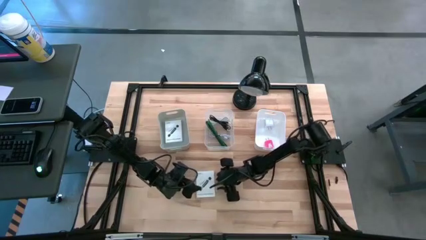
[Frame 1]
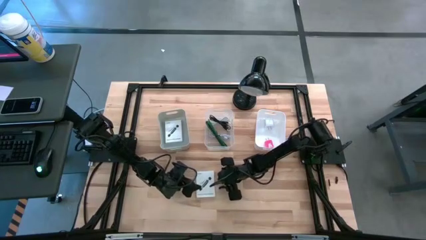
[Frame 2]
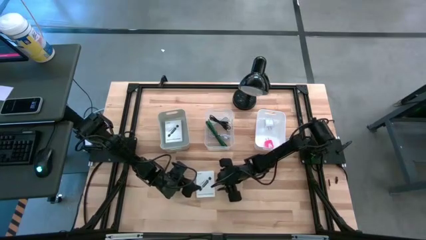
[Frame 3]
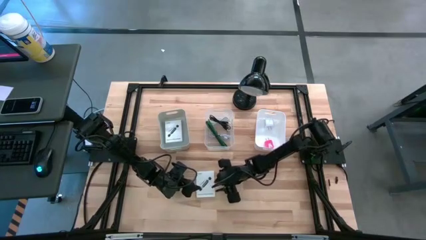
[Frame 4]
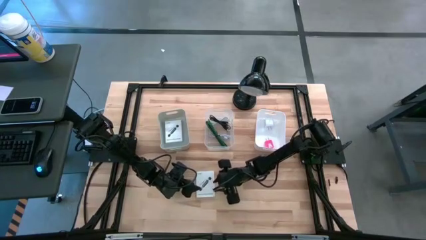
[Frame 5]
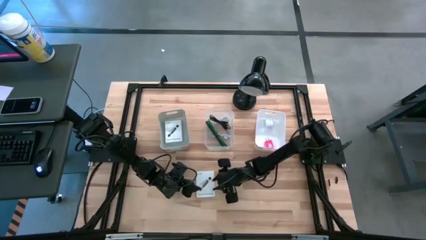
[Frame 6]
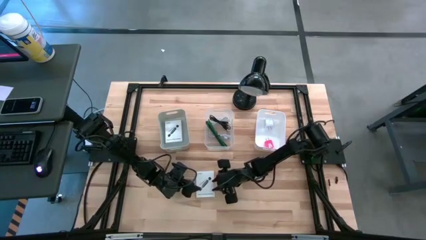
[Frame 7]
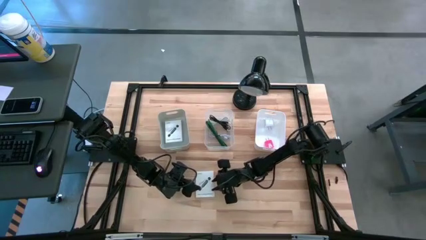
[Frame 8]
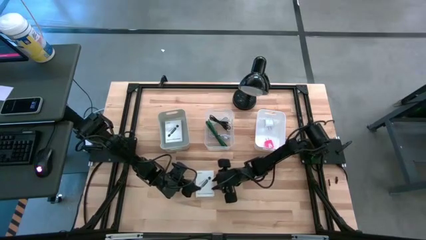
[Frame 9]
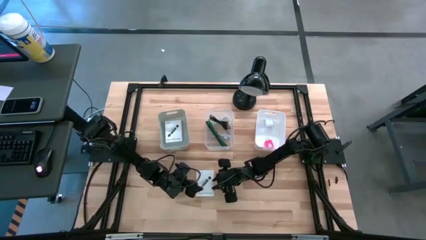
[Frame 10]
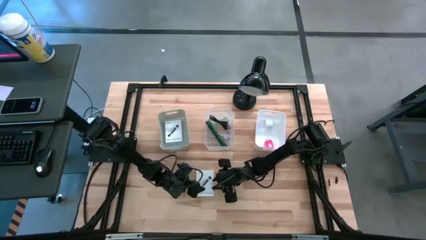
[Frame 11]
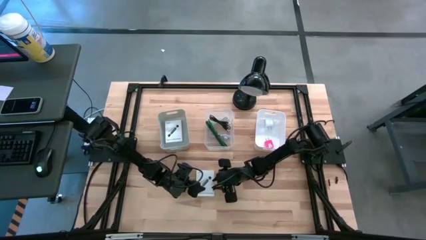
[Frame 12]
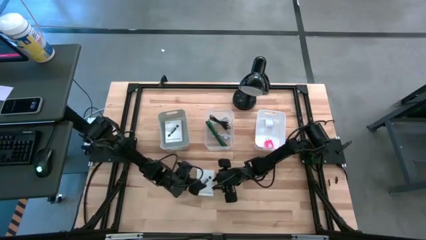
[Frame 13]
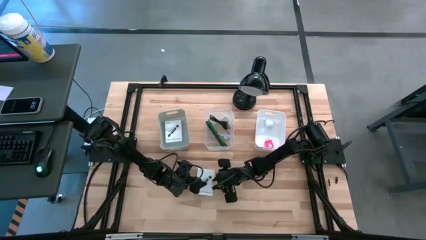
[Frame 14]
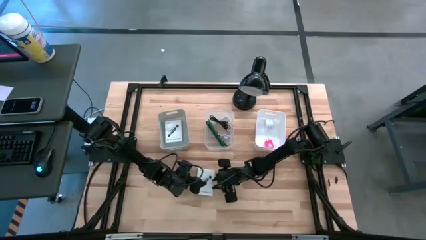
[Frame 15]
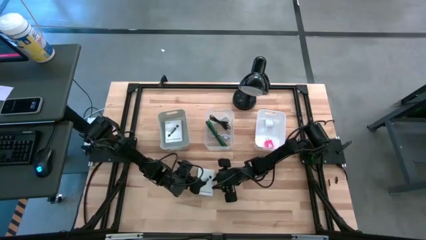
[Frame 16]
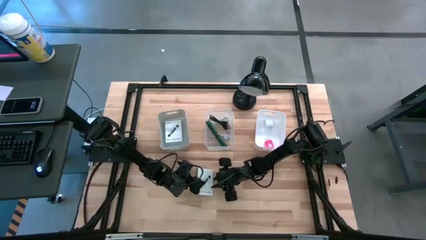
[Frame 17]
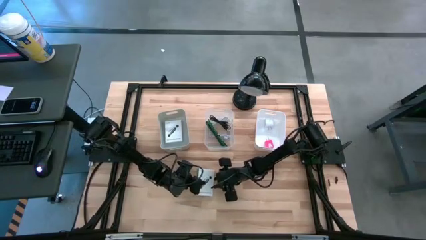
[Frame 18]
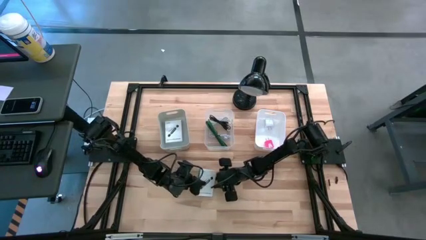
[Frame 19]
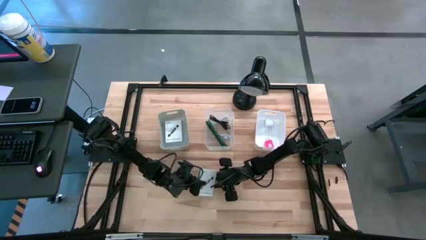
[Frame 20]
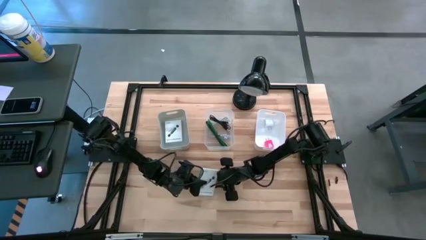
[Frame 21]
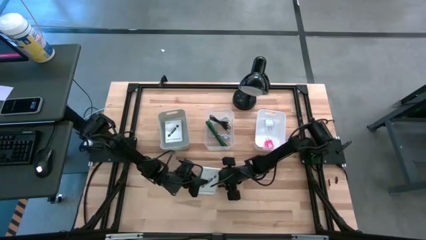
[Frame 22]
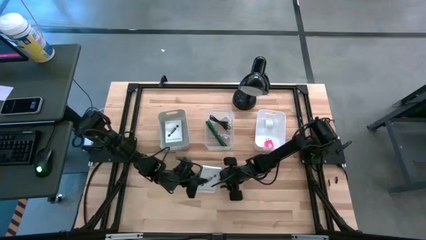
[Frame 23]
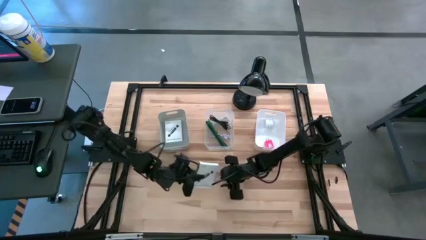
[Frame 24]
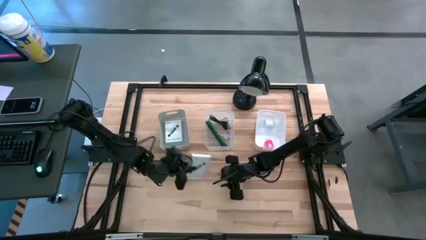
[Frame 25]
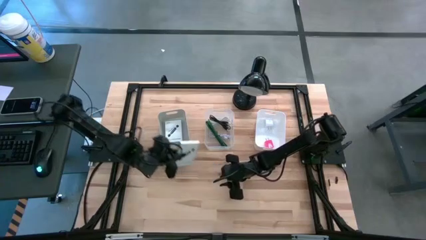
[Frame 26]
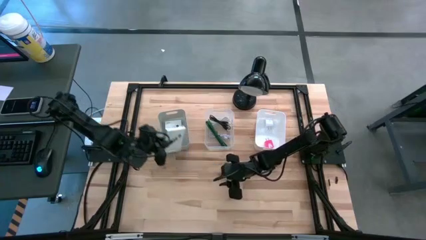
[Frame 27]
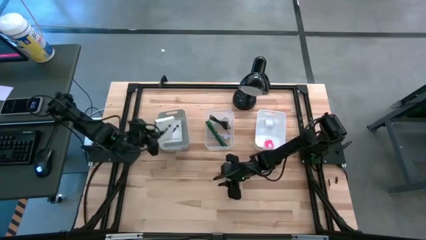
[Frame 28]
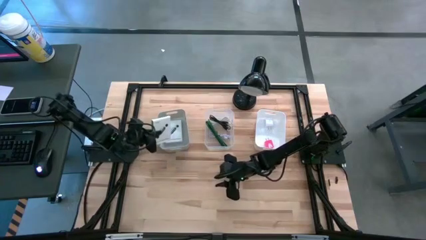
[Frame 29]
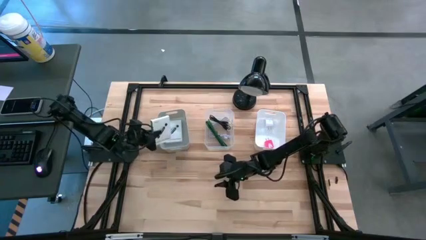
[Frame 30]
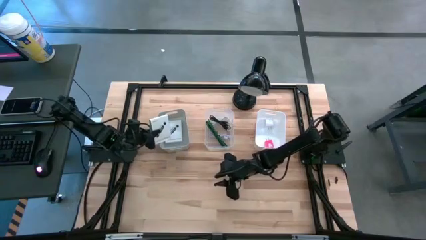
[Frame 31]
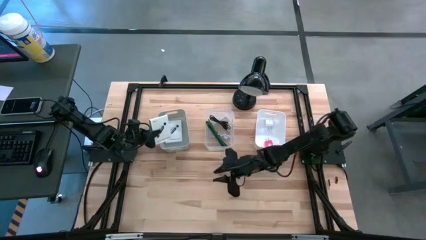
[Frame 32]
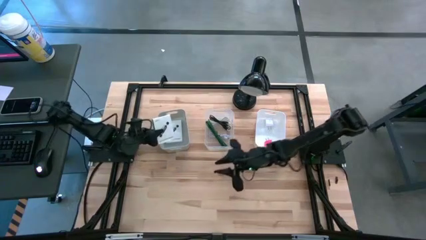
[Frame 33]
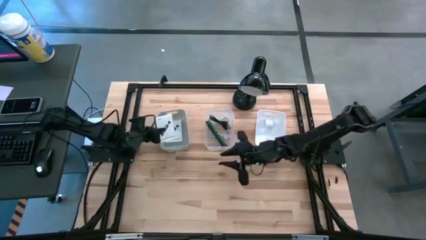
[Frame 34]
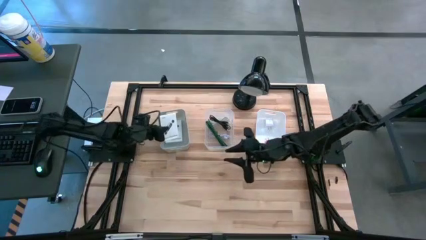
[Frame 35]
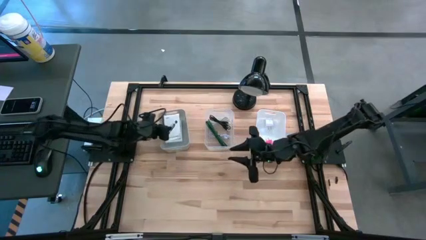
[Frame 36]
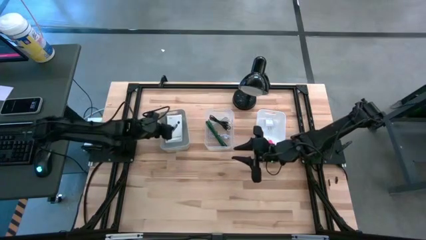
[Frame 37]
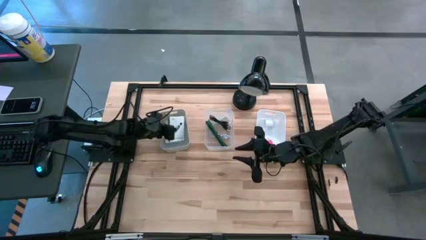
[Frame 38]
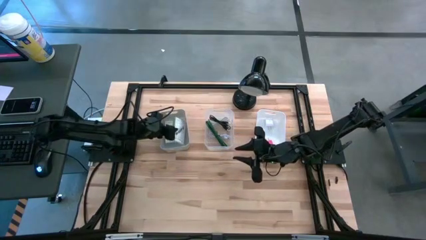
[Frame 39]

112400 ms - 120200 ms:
Task: Pick and place items into bin
Put the white card reader box into the gray bin

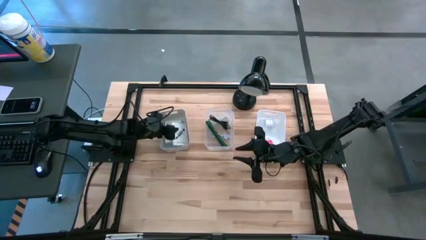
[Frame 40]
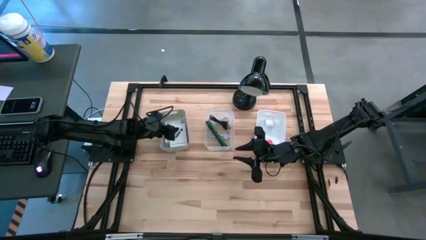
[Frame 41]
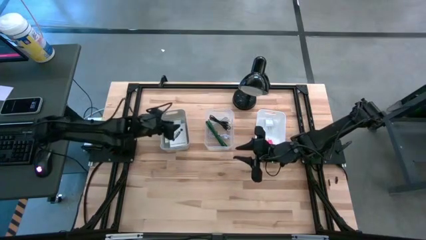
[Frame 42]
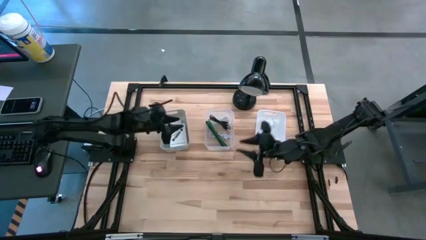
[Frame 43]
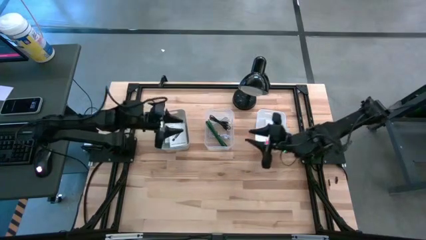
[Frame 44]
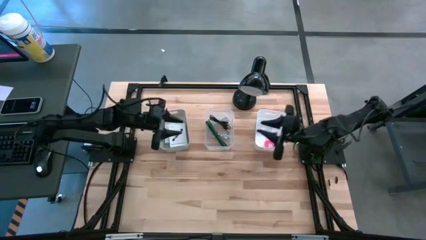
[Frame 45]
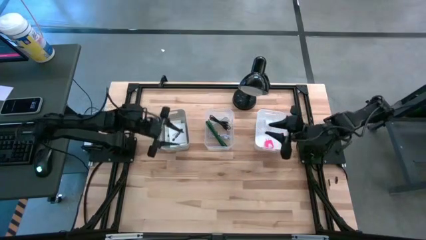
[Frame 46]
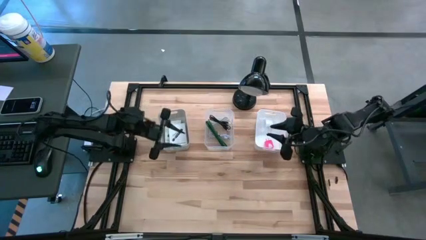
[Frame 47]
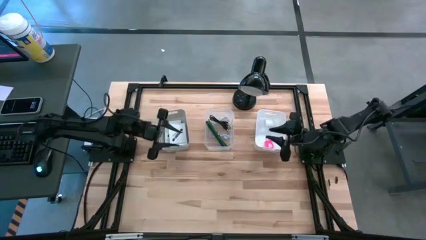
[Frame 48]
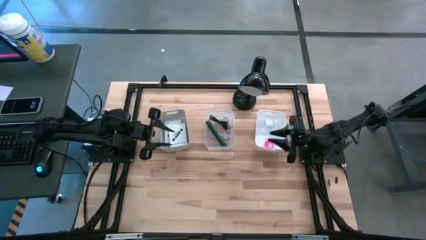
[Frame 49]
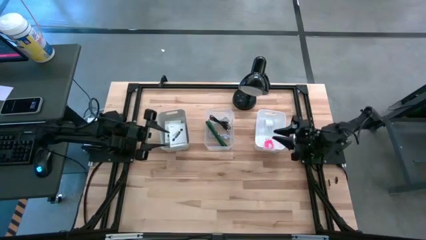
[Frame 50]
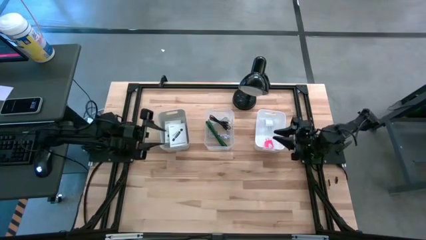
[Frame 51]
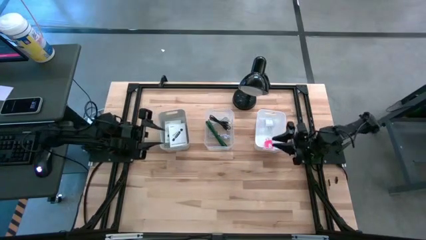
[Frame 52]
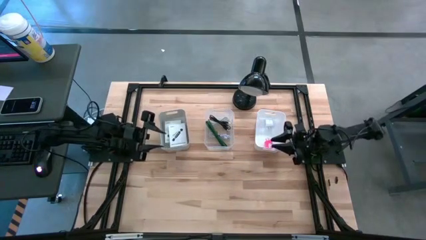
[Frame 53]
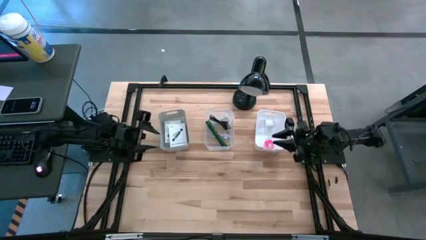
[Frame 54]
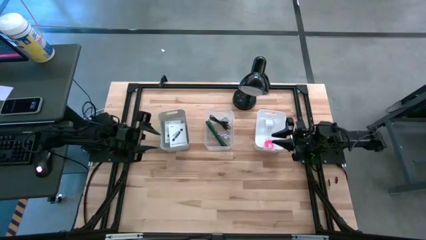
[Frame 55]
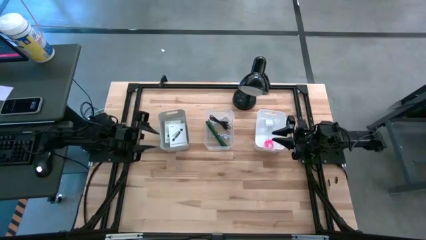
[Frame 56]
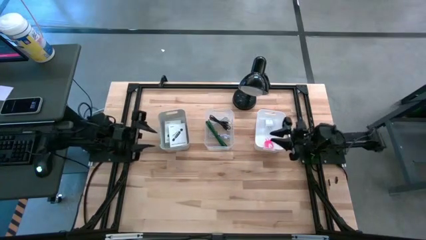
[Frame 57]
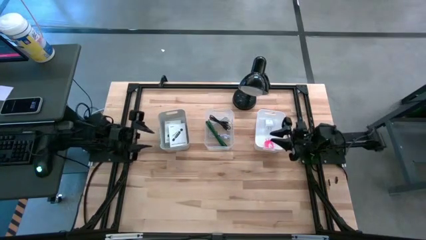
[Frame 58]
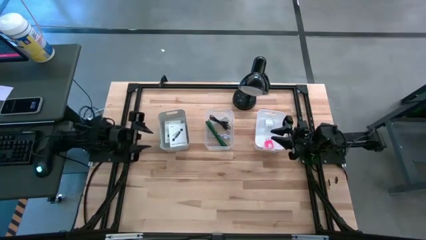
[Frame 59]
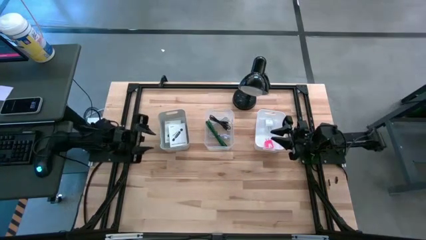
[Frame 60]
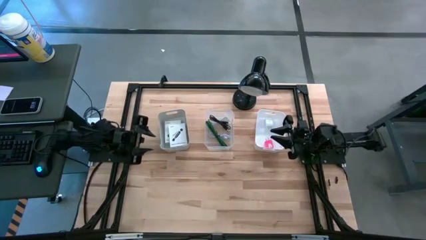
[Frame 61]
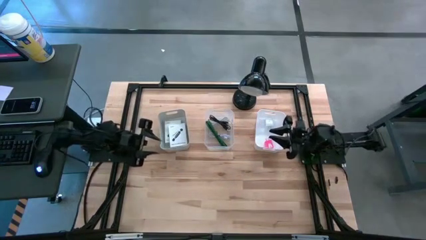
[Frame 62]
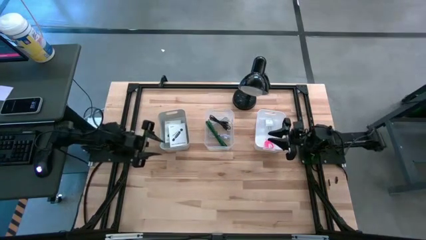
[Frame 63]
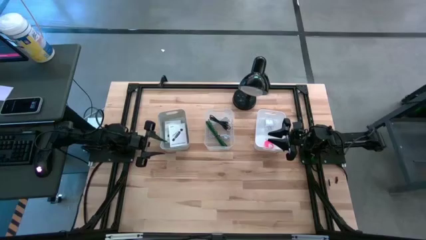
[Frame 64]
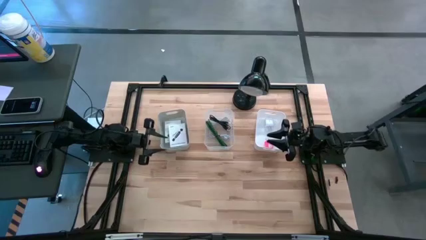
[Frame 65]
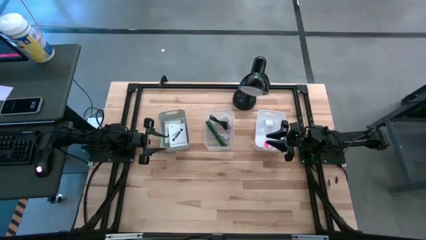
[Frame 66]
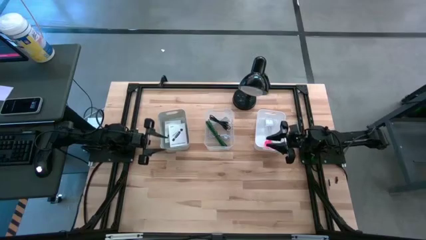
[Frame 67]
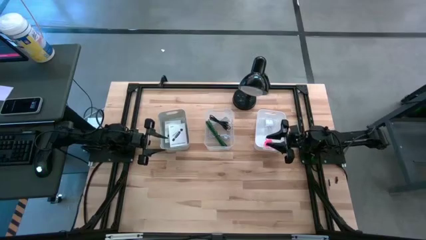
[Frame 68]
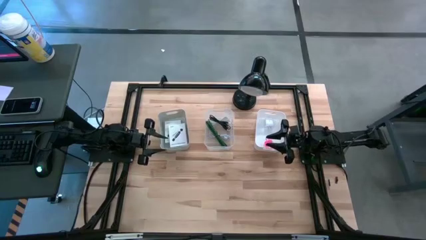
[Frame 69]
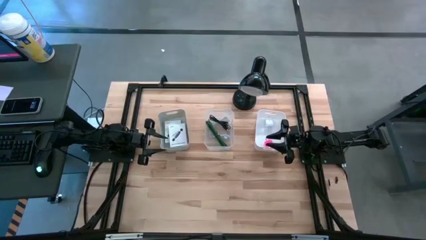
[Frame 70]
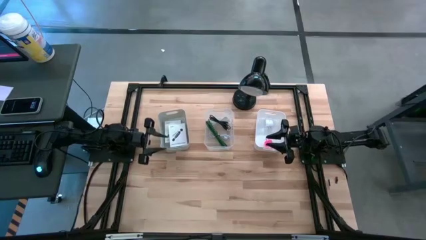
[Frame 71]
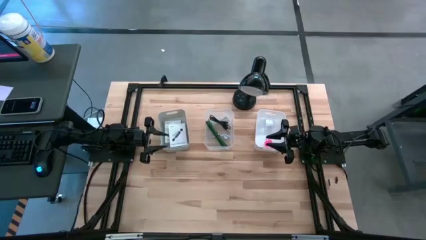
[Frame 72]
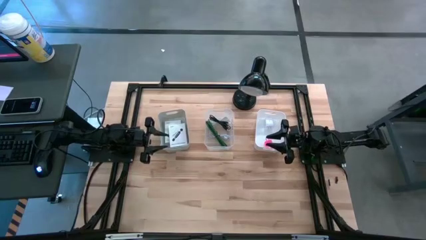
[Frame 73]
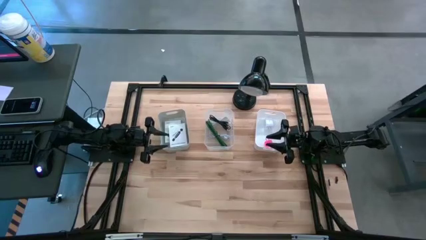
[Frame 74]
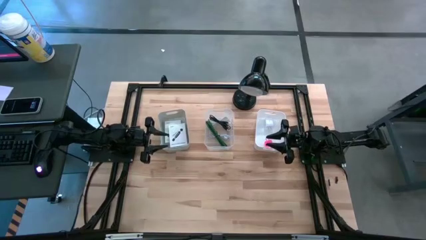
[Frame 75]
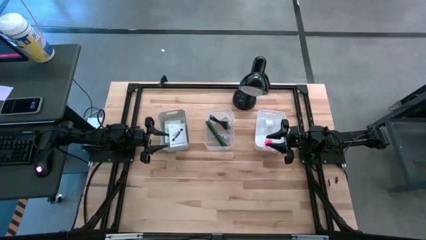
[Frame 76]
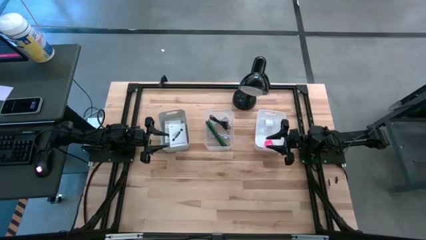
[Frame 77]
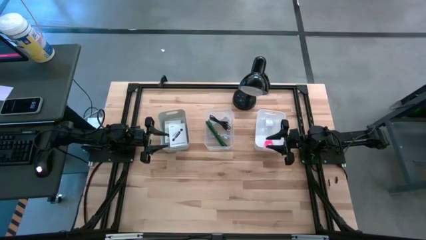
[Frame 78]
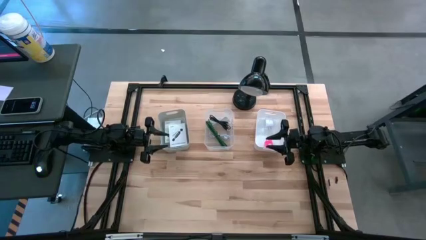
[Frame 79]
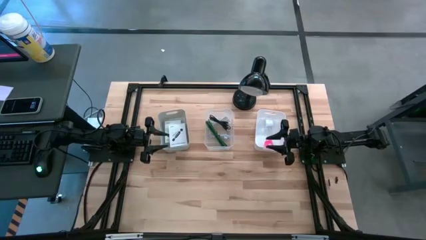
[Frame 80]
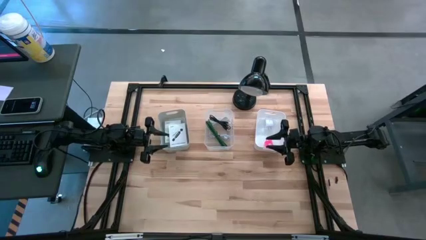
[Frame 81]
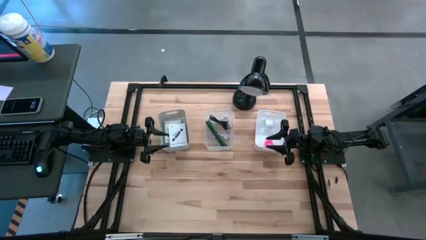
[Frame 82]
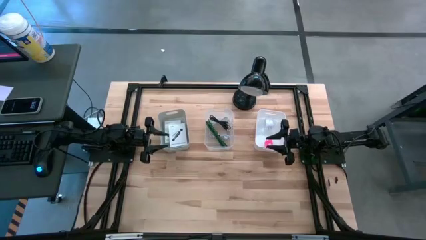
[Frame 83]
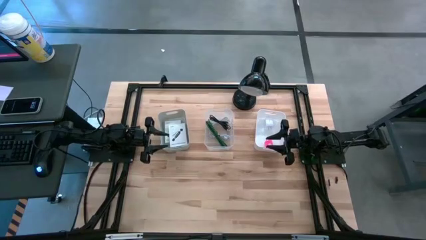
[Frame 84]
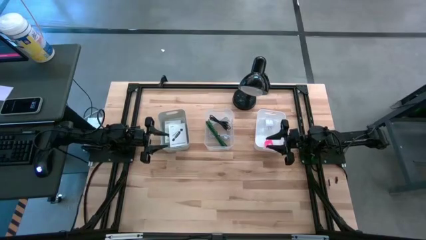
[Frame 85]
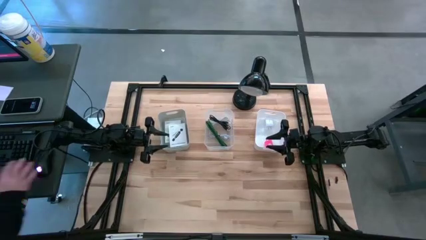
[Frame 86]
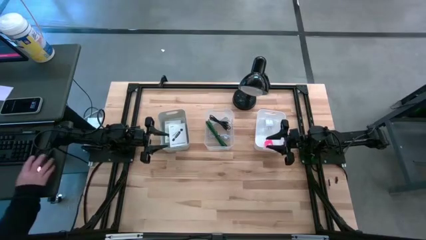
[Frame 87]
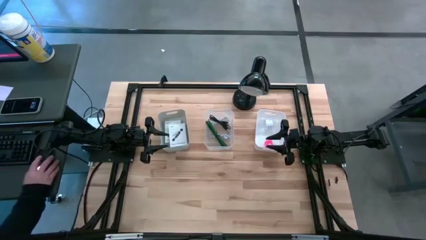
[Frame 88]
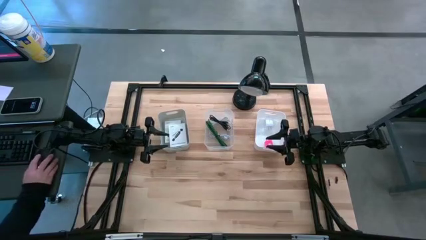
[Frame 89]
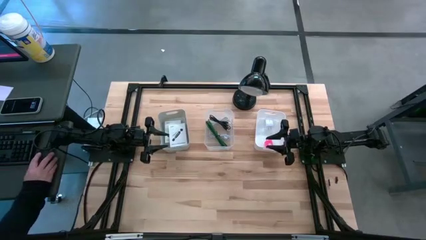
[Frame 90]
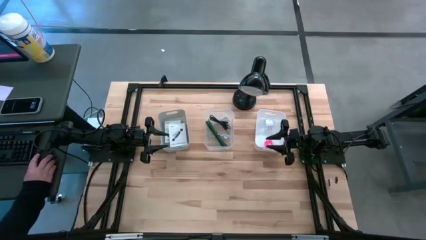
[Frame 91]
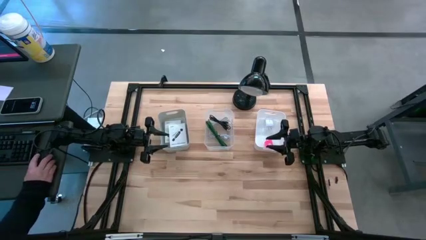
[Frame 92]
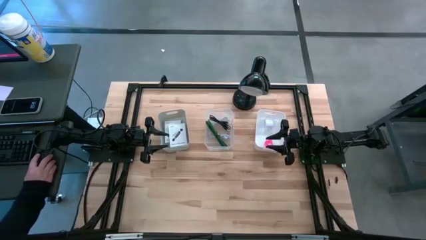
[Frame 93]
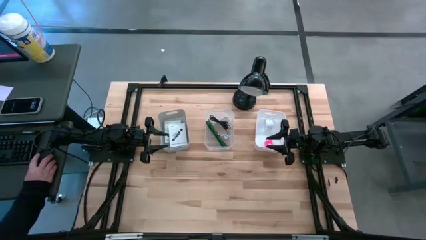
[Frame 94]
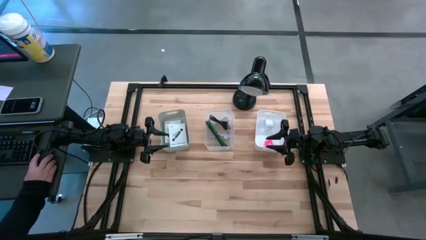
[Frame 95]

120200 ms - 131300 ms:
Return to Home Position
